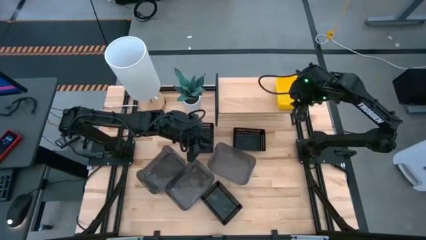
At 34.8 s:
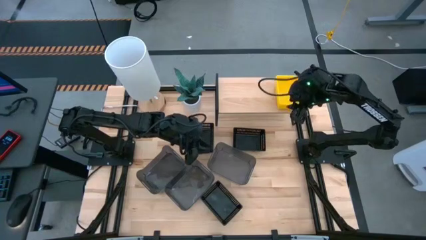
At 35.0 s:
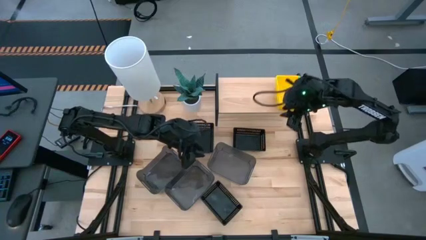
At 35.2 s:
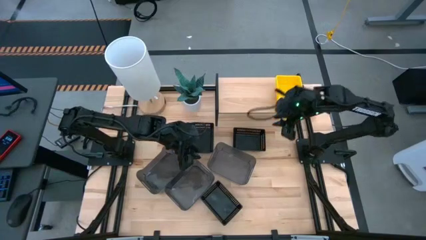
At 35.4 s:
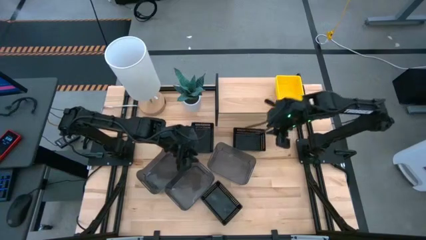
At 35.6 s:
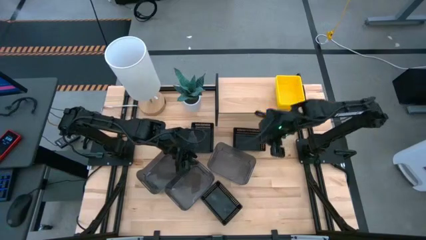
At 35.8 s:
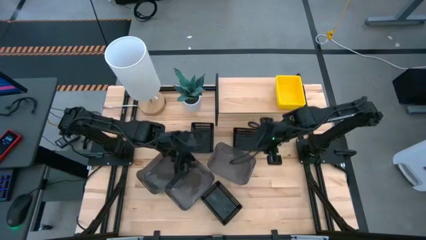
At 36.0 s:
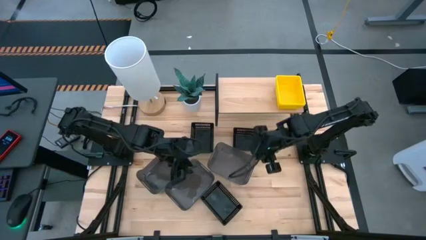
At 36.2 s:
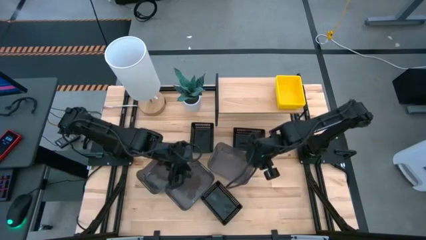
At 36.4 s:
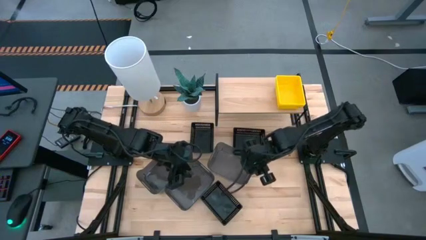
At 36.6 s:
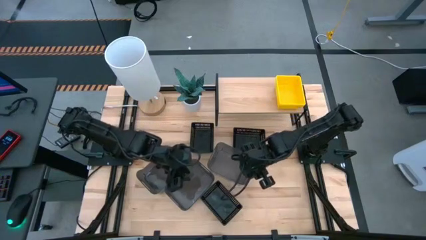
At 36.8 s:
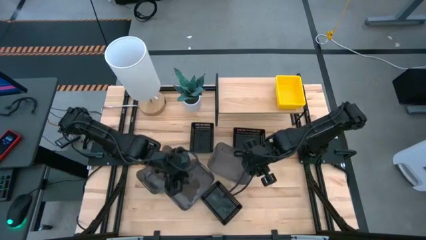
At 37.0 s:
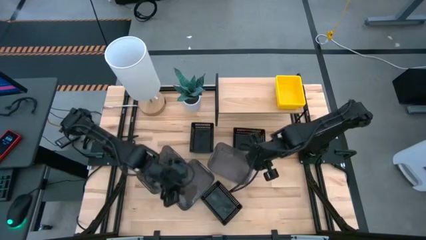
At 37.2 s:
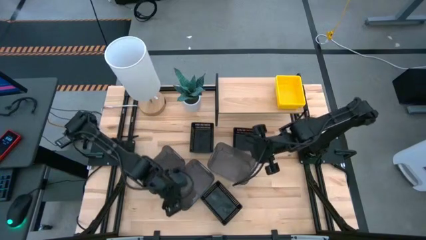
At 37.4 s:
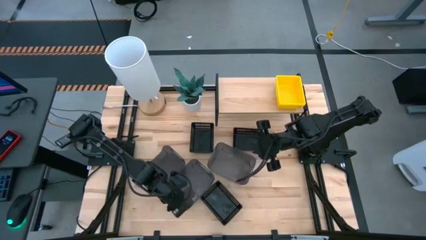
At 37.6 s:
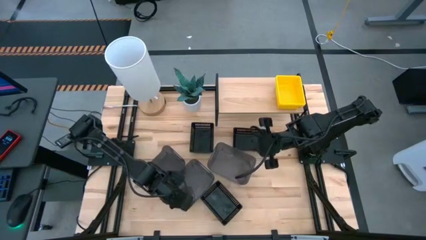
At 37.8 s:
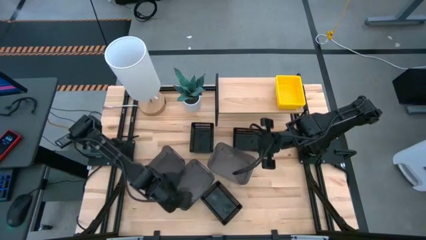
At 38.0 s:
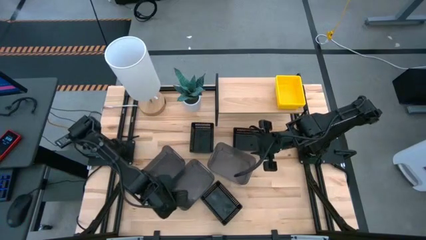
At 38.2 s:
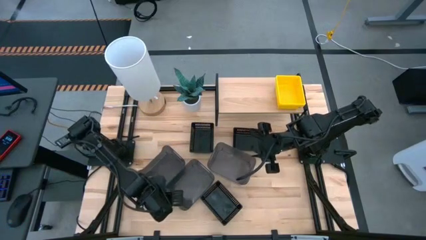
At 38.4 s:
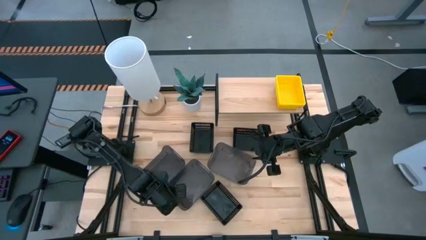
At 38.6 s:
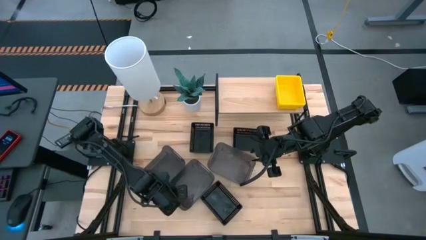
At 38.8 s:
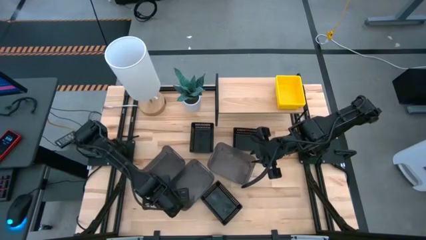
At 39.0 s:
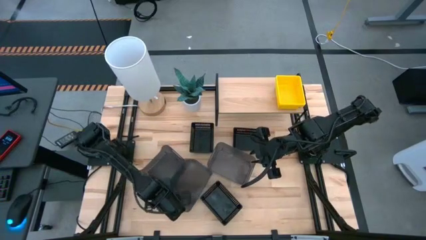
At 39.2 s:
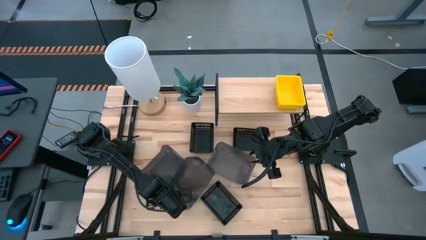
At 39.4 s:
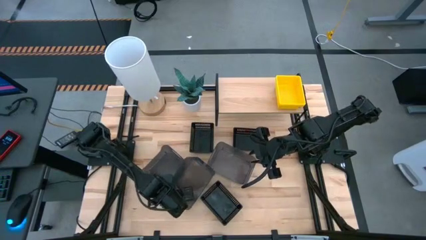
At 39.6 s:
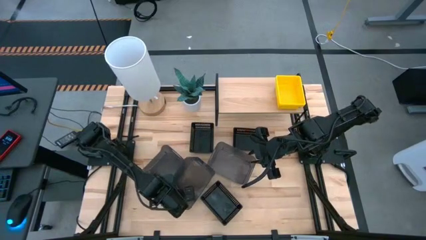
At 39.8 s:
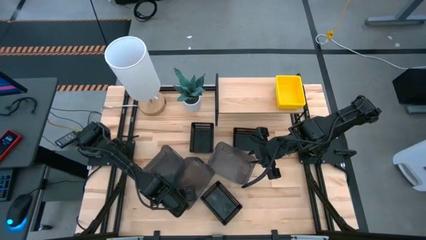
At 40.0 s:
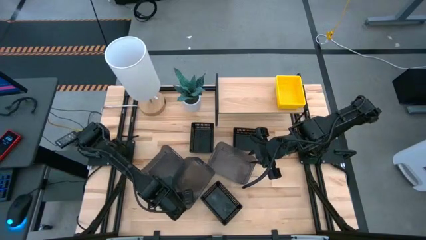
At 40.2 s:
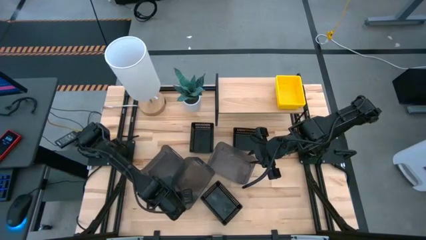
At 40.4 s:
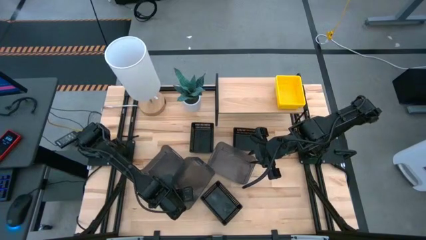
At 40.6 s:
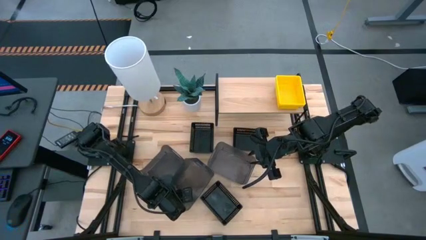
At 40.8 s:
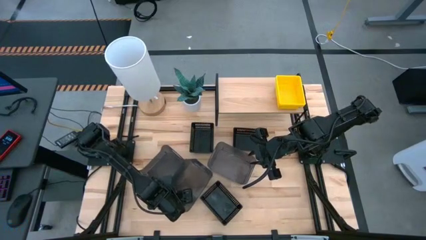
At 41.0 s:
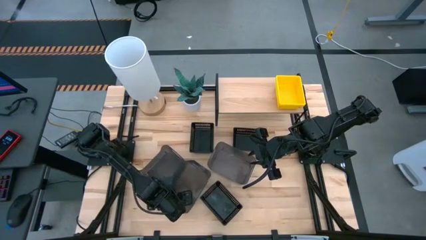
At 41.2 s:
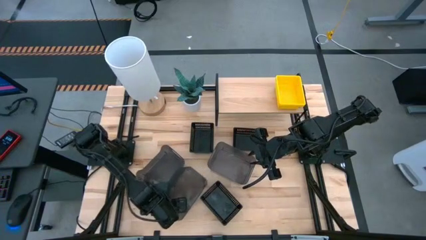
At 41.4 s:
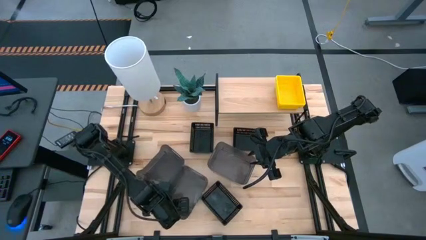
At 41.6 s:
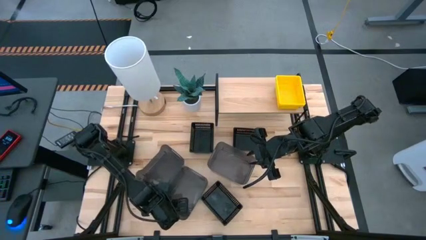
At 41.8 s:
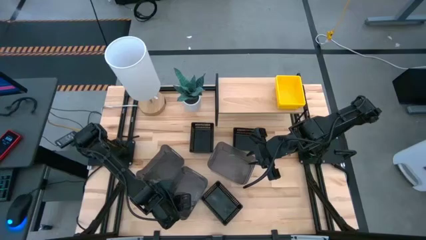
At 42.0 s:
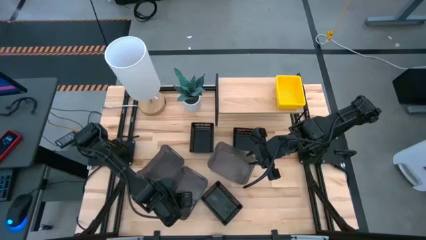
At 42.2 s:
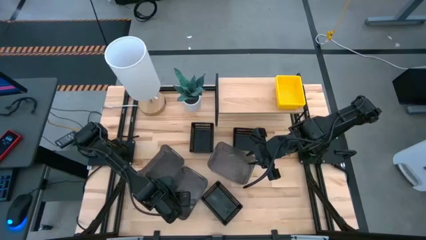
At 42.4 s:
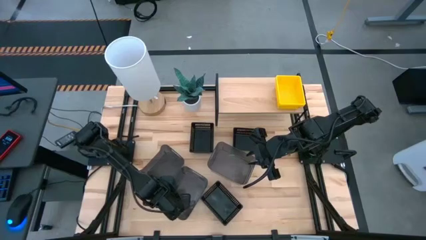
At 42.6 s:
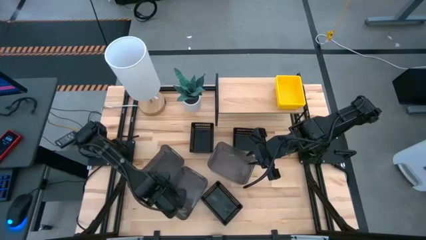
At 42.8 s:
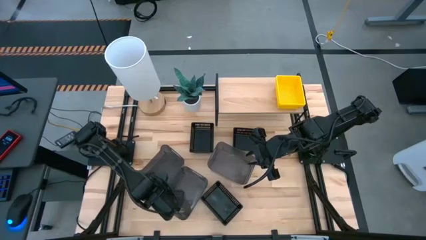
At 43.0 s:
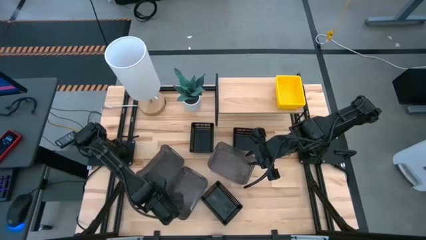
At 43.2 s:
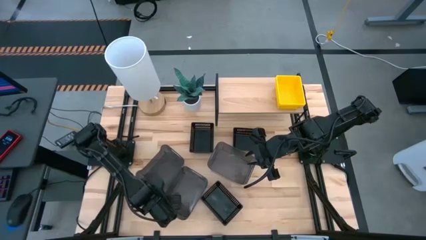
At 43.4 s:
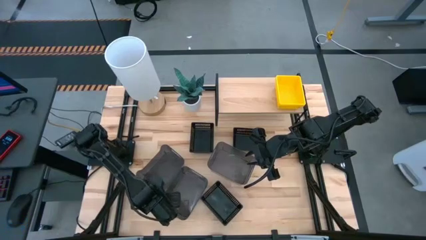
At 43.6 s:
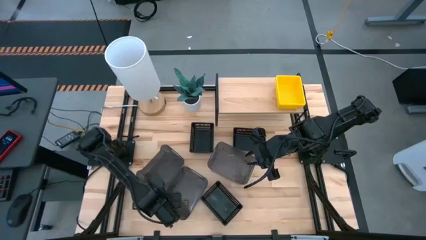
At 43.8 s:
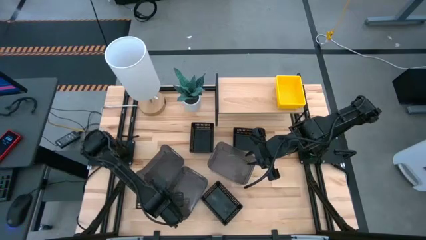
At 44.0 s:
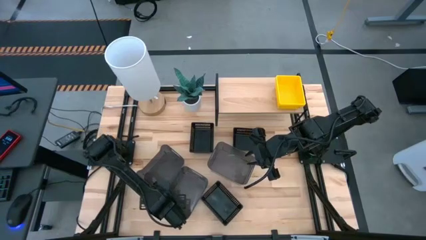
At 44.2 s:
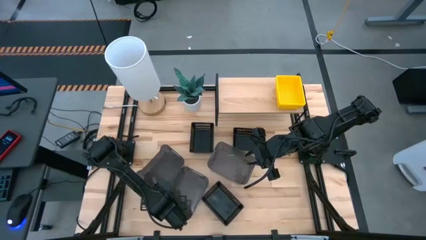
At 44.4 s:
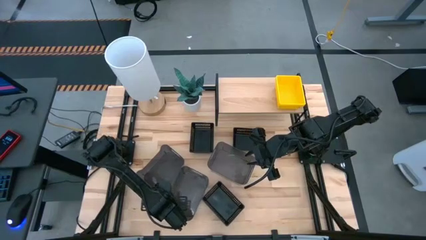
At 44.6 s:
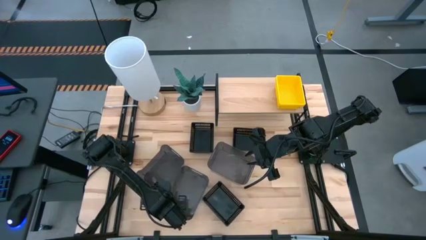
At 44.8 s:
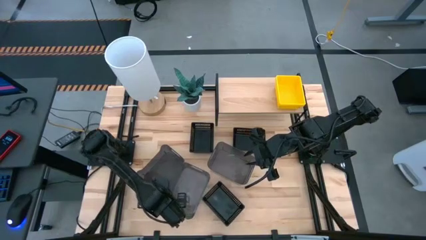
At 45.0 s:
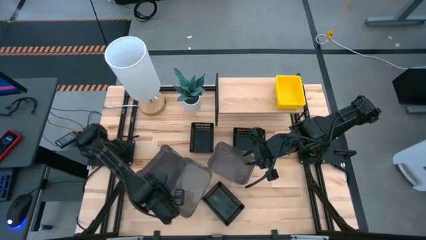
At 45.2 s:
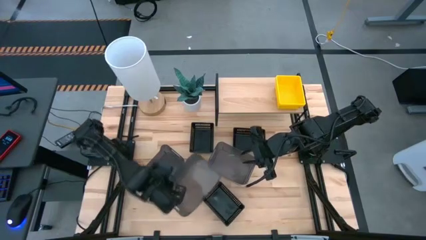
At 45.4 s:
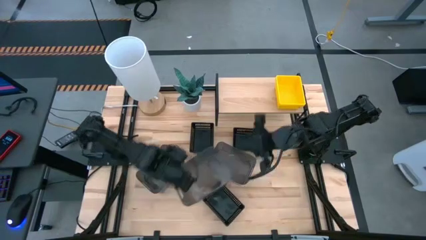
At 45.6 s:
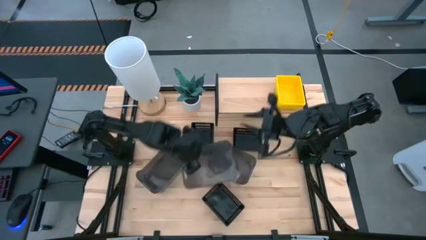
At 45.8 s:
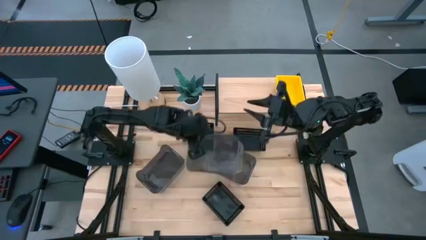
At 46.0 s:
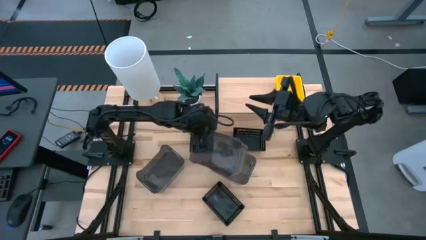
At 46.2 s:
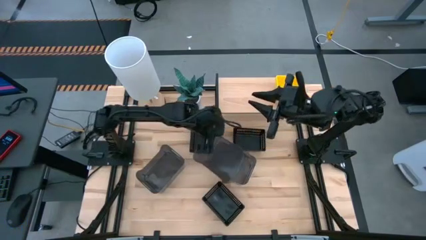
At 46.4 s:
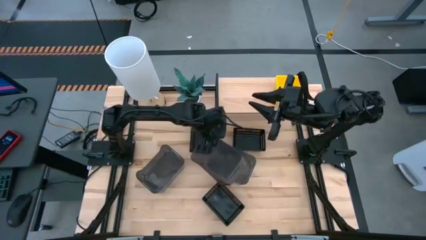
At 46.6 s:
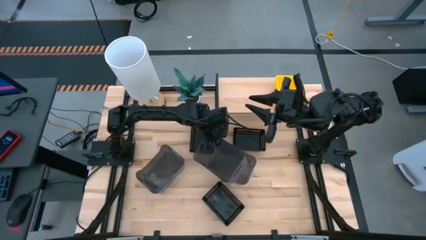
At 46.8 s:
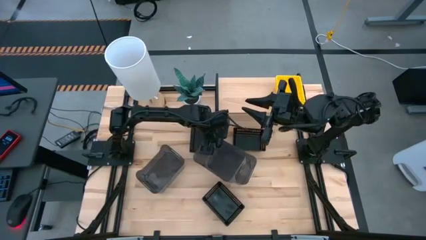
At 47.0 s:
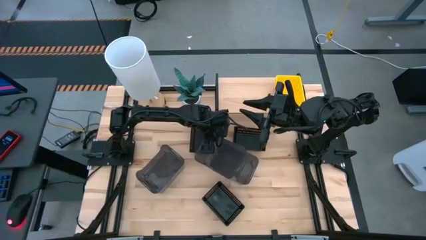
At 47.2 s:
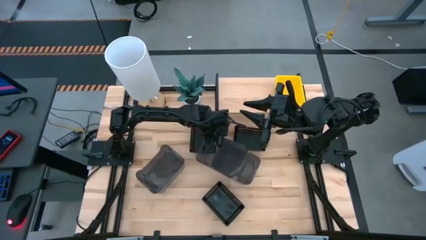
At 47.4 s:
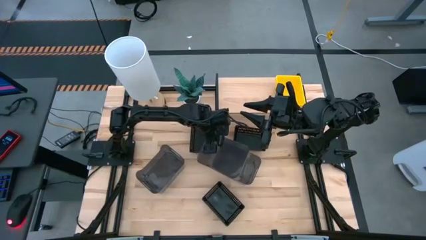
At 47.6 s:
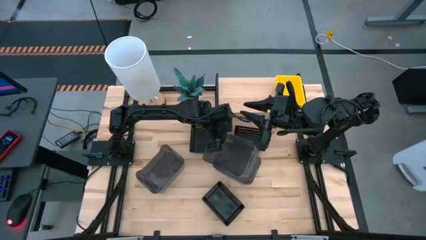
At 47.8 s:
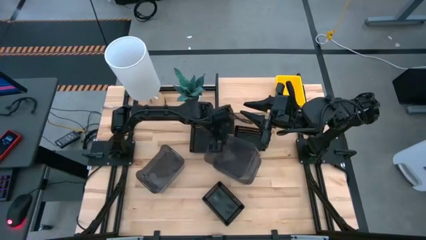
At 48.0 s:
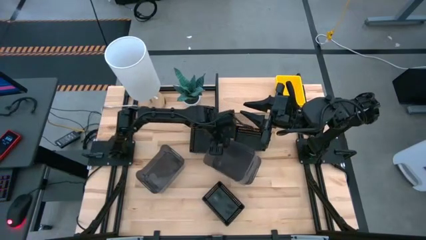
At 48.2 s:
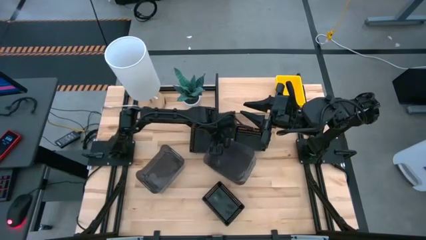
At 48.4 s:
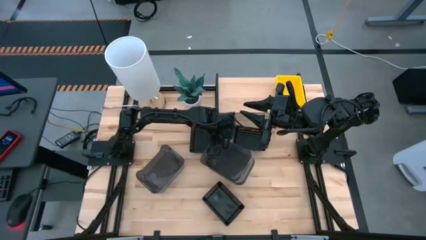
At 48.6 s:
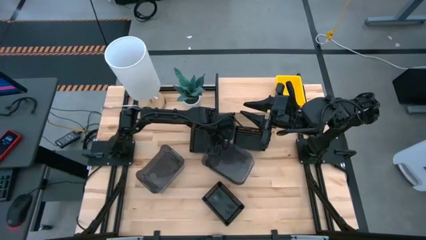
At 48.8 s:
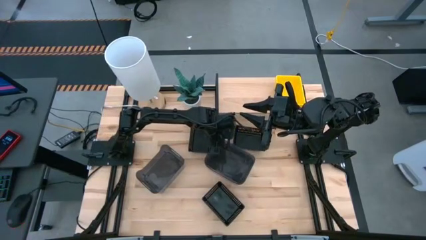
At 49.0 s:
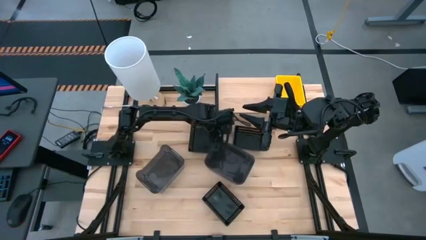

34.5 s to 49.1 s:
Task: Stack baskets on shelf by color
Stack the middle gray bin on top of the gray bin
